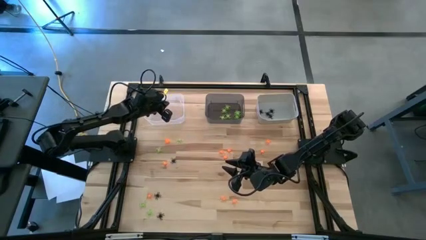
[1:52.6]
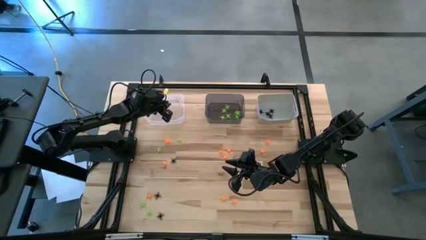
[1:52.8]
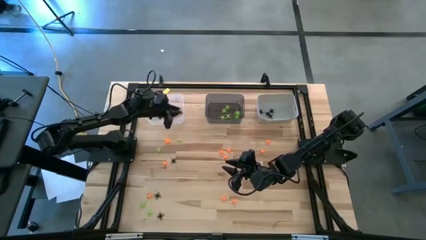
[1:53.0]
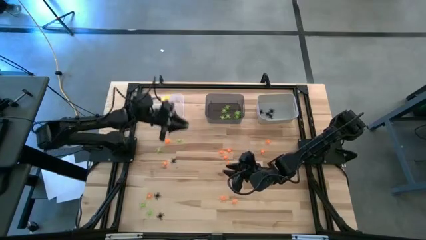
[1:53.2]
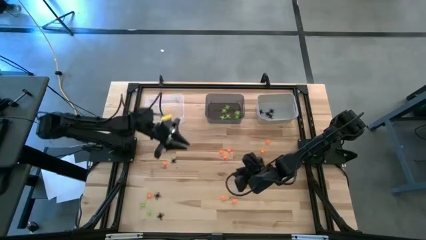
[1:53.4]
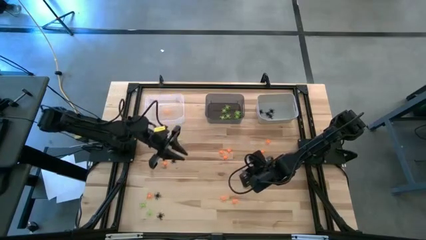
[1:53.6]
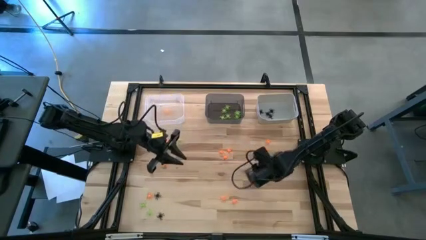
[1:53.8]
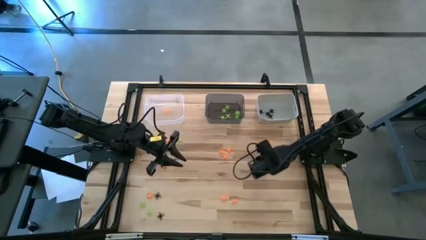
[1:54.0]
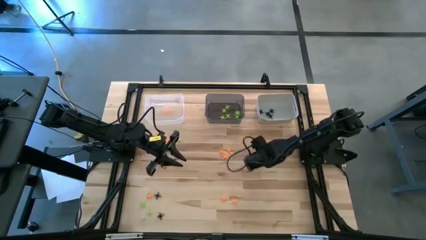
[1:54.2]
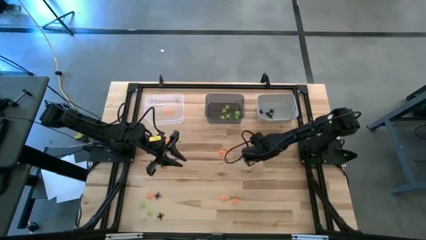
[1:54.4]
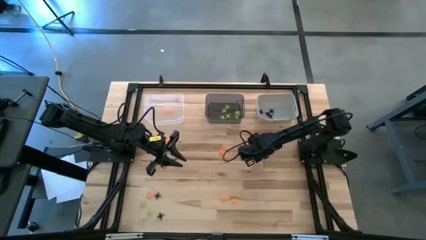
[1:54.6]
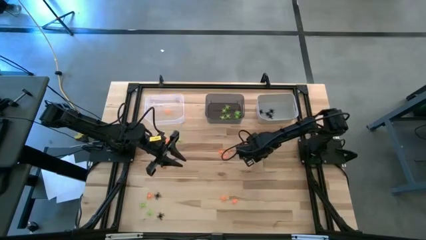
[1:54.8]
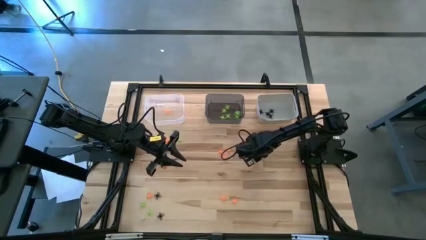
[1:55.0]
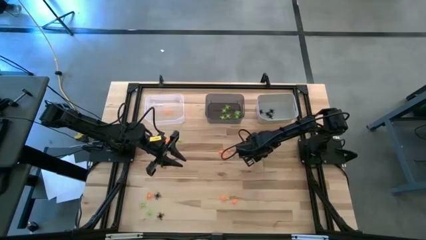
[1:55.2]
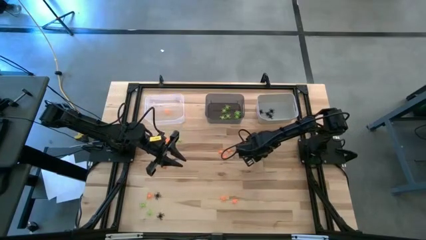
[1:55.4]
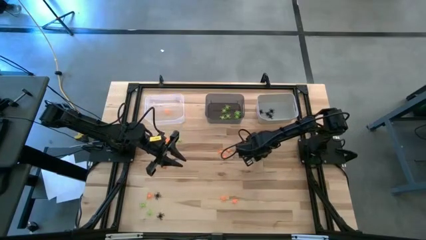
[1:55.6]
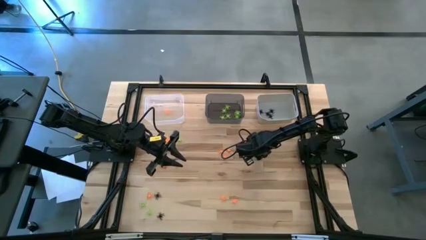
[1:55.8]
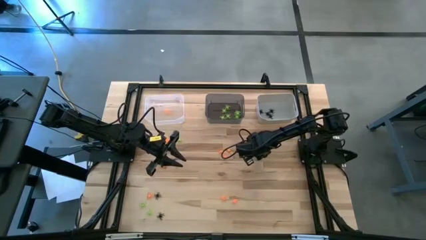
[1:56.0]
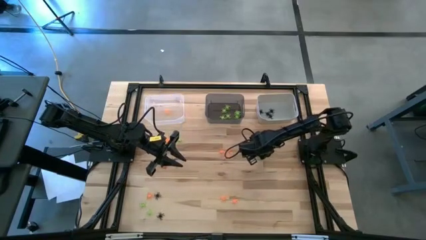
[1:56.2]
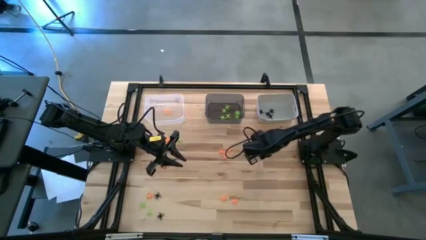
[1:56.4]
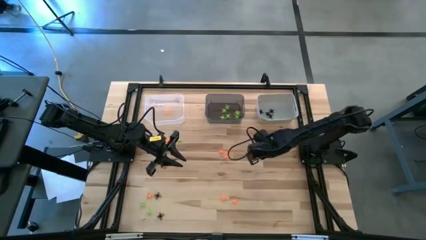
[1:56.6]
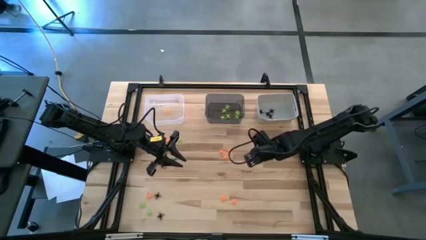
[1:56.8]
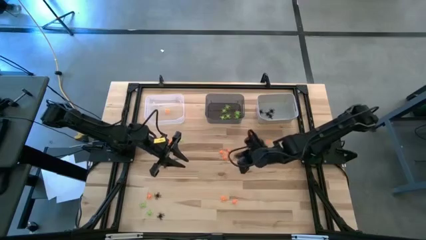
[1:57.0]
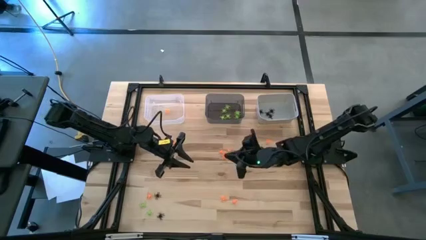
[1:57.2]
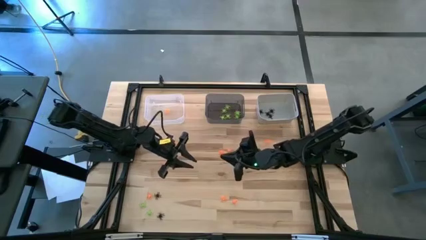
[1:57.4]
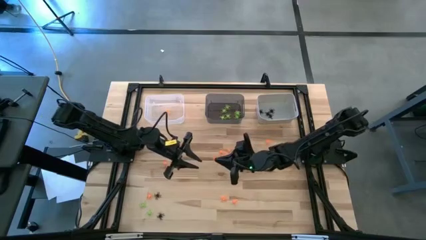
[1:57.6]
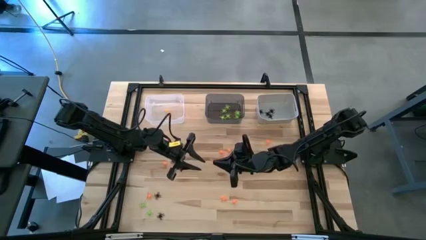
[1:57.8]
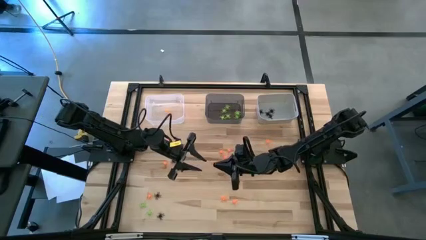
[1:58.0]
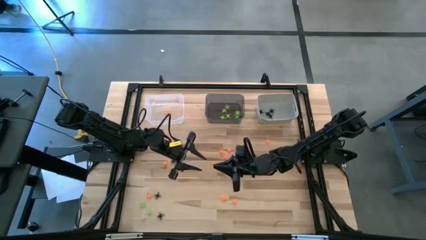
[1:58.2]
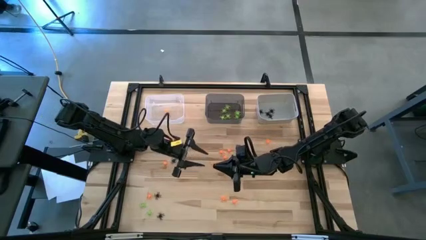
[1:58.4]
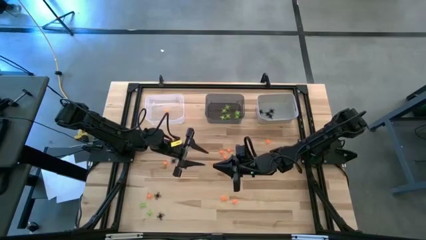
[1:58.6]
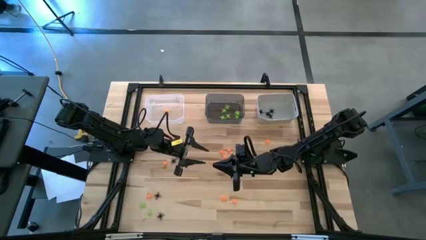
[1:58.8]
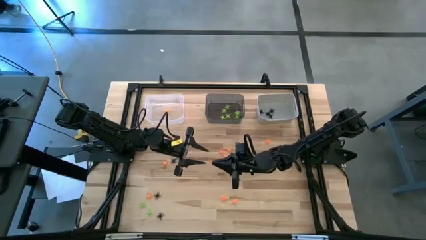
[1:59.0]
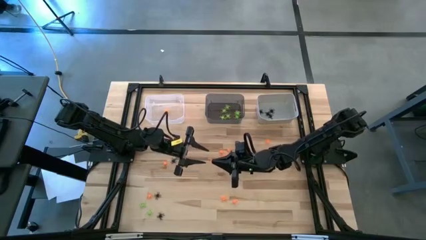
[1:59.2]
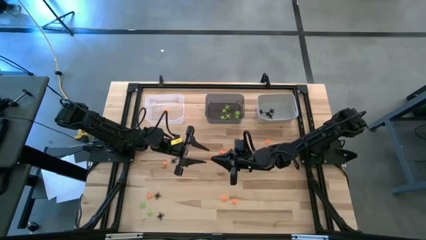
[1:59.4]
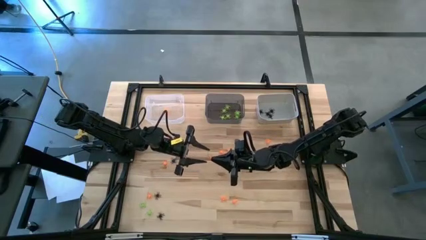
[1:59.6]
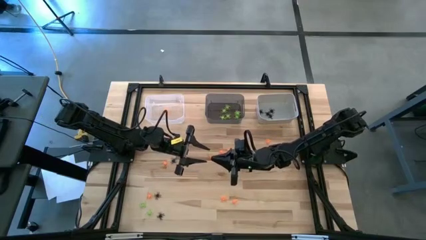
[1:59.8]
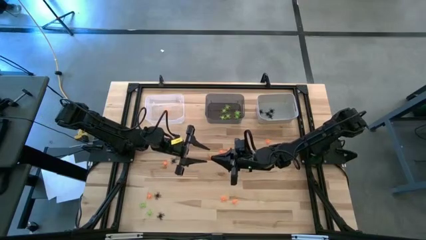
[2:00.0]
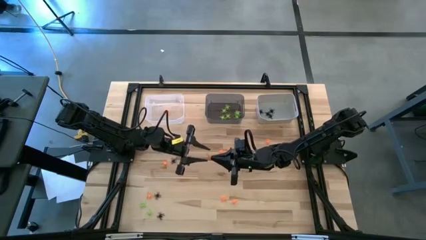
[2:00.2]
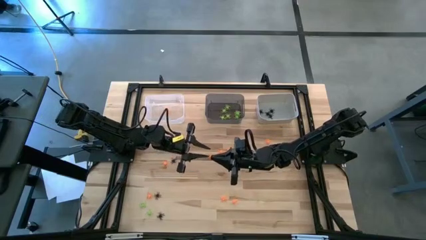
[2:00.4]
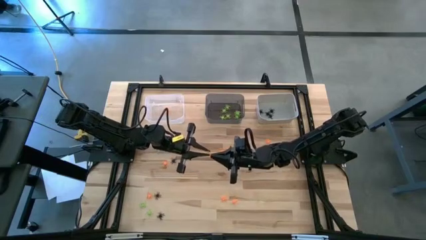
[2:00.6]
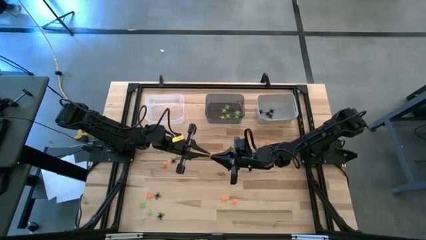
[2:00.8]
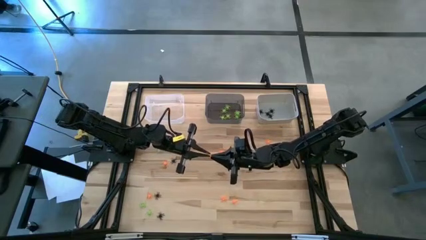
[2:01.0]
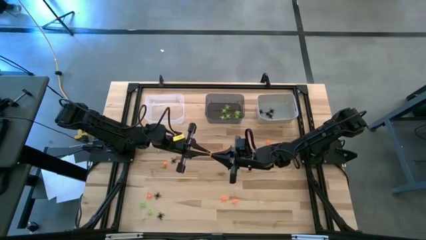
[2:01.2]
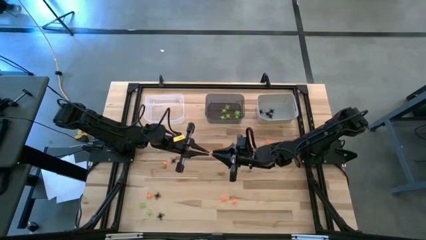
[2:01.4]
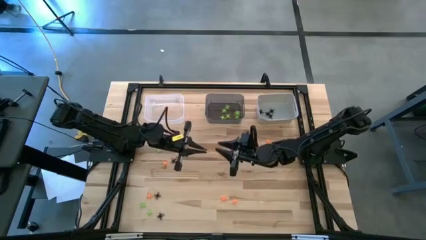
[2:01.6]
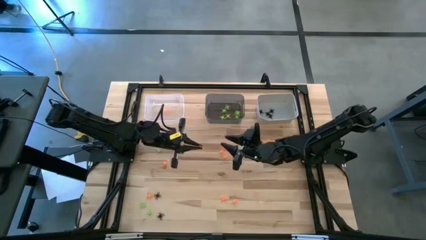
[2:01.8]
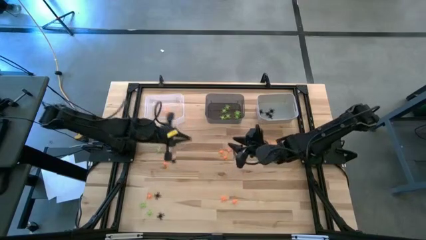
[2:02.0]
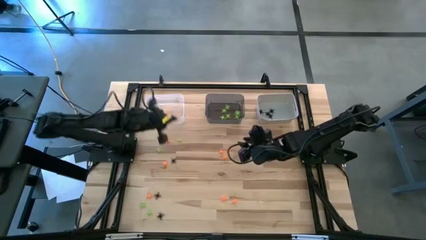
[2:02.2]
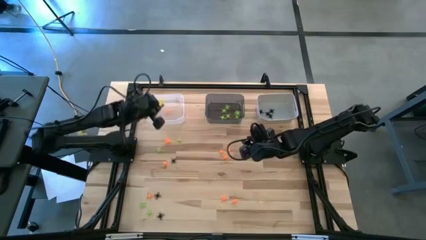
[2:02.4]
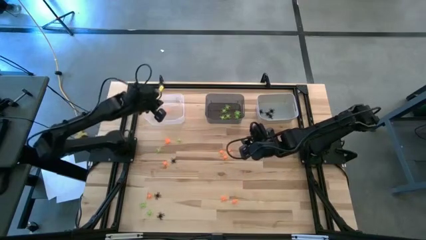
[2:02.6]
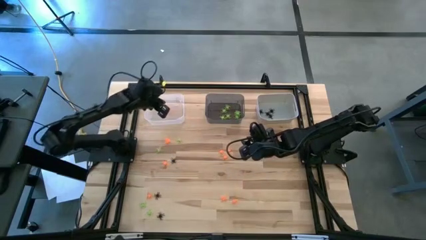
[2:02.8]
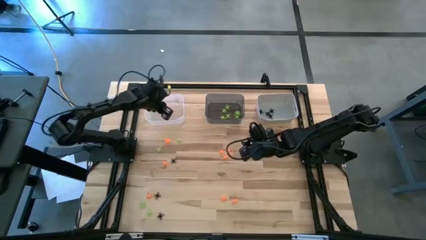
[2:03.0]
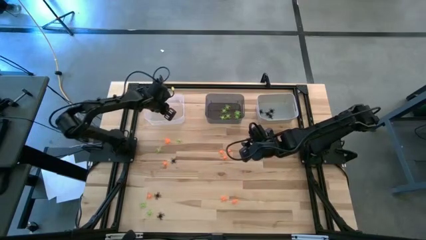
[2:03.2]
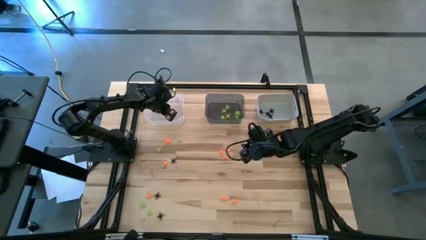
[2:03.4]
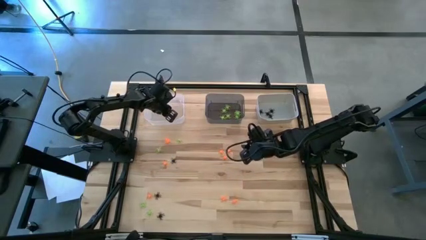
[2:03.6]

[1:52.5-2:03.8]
Task: Sort Halloween decoration
Put the orange spider into the transparent bin

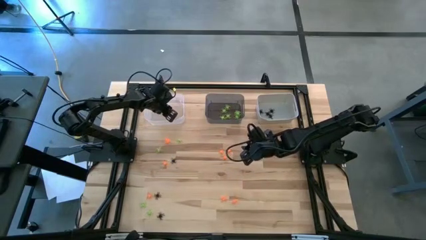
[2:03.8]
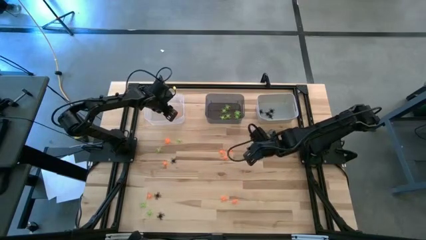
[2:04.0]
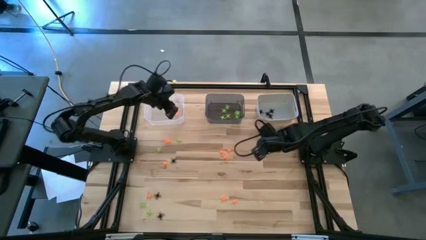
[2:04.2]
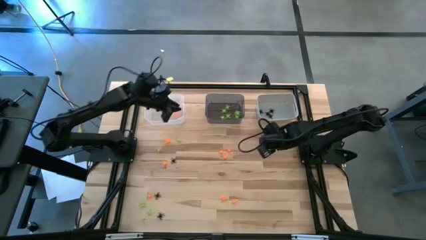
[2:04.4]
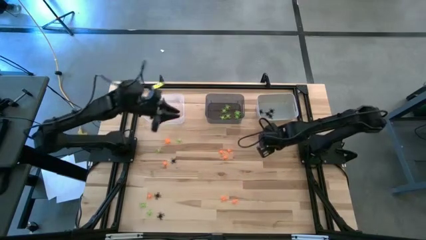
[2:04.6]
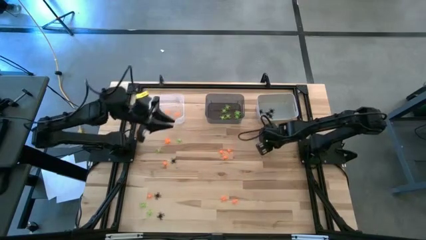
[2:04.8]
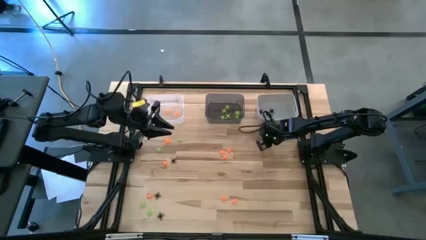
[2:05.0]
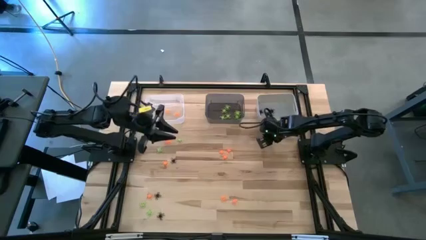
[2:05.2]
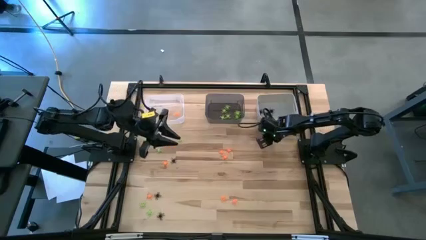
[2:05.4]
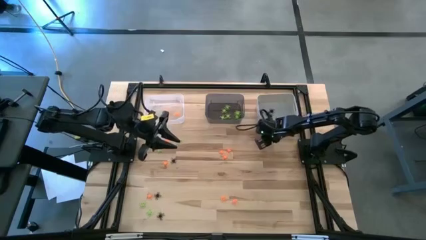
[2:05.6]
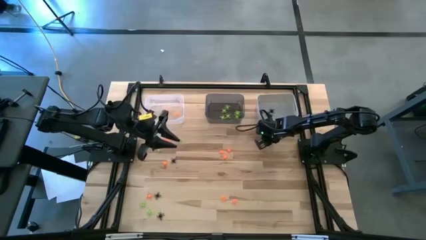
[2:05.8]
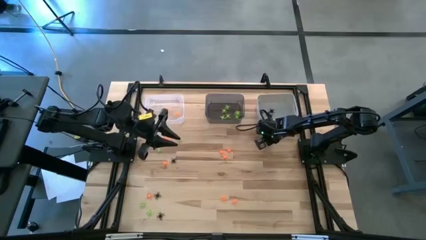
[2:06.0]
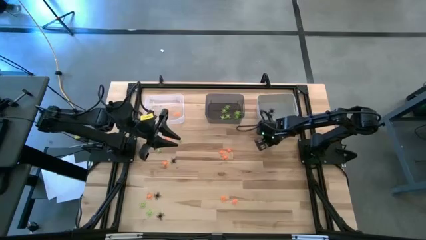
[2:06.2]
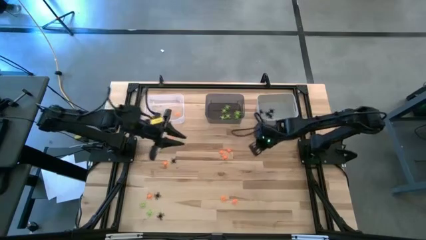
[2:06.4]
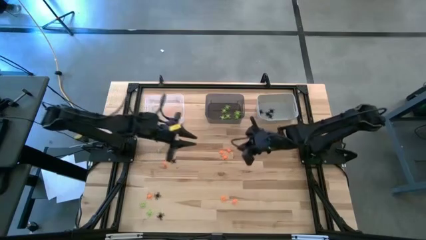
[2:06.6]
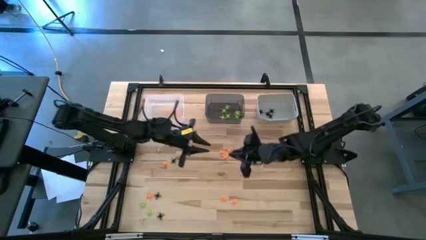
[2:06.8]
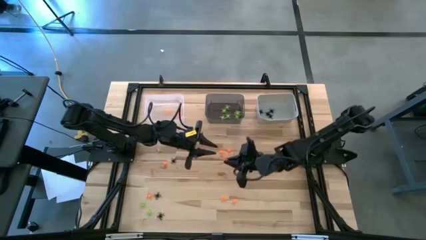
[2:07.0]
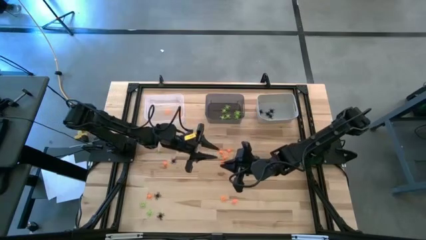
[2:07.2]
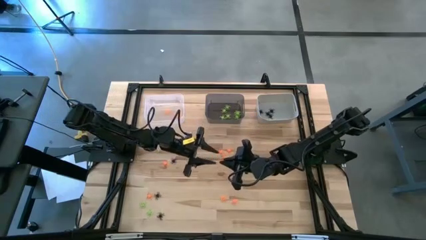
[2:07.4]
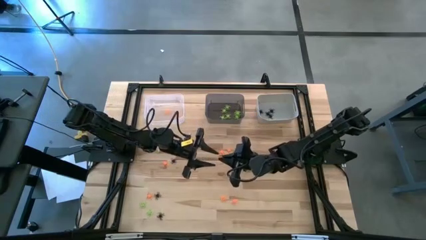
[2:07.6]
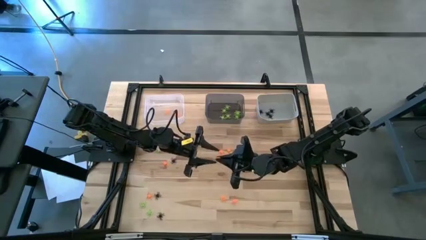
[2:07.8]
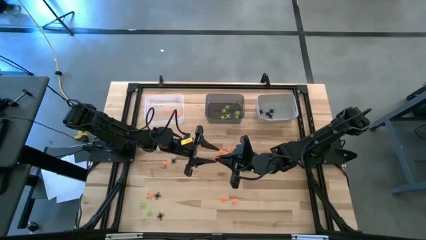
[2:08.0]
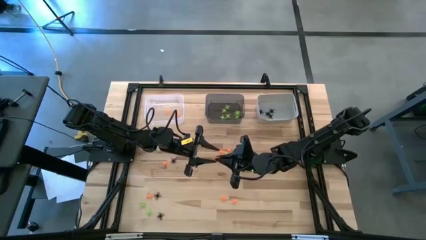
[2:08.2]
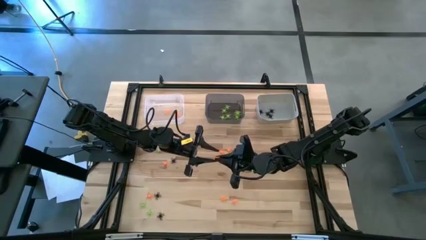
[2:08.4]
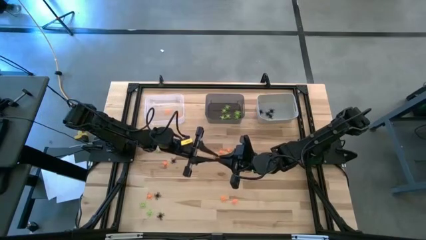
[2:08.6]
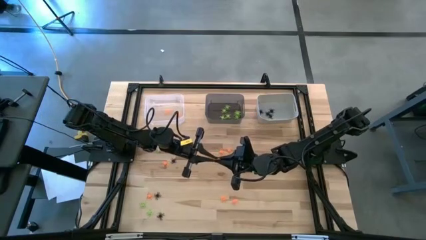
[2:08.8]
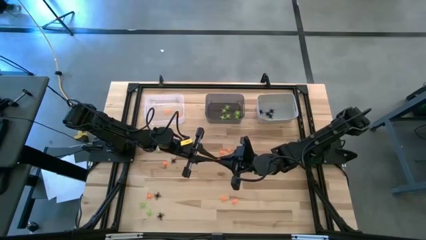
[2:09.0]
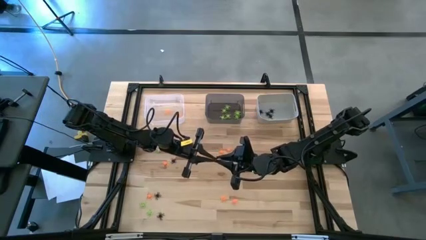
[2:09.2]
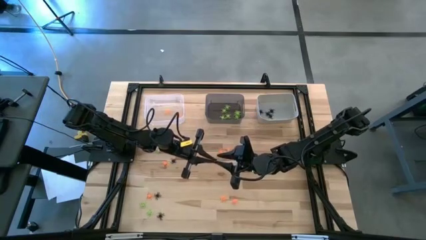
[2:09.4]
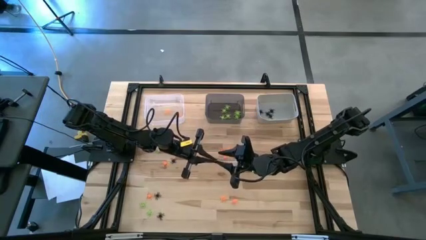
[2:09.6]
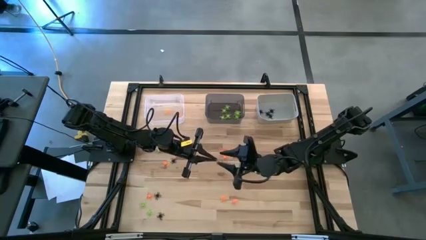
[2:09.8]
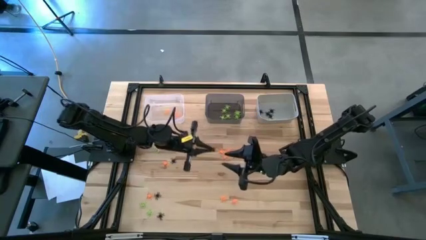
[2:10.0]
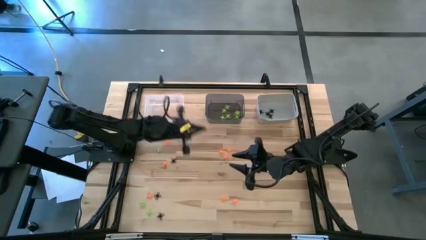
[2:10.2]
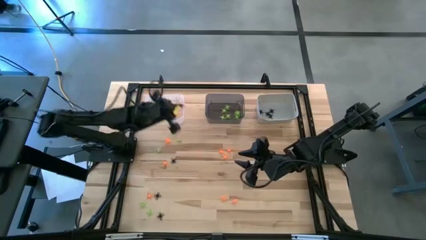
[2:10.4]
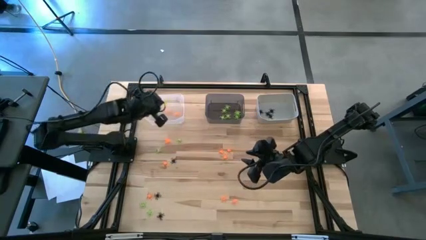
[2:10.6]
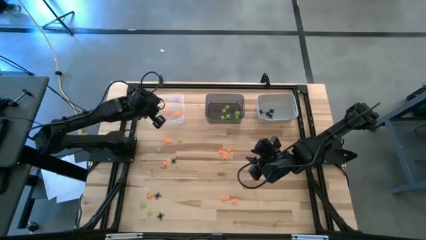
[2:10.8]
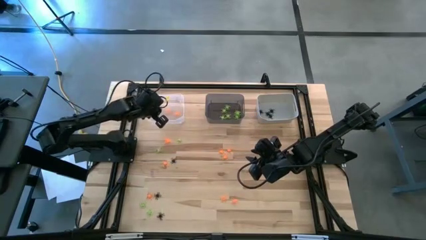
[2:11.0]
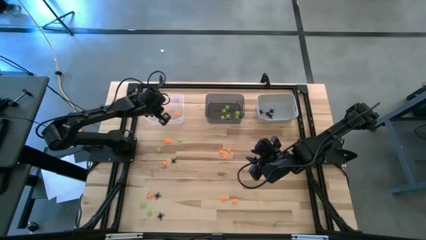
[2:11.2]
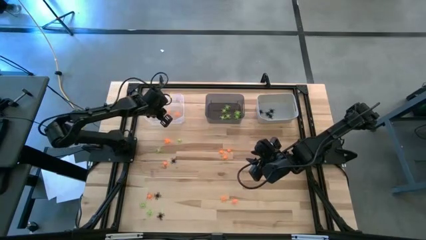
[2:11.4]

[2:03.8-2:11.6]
Put the orange spider toy into the transparent bin
